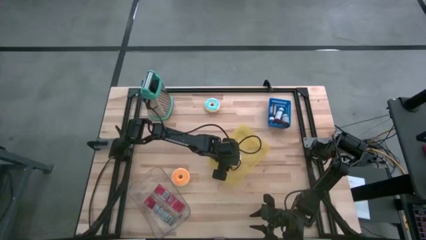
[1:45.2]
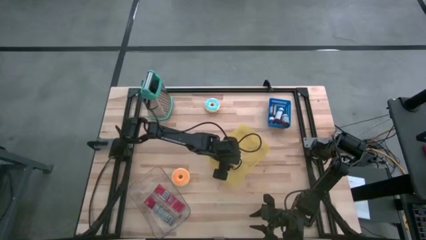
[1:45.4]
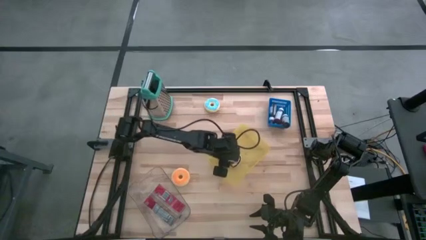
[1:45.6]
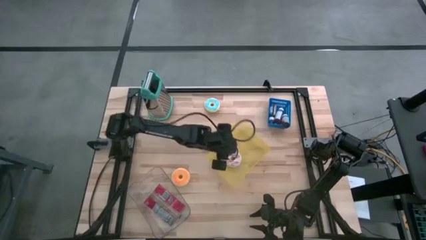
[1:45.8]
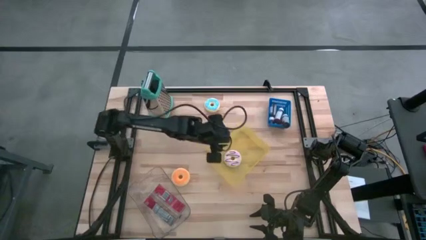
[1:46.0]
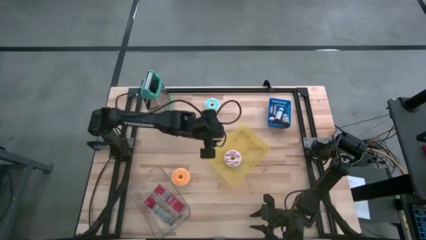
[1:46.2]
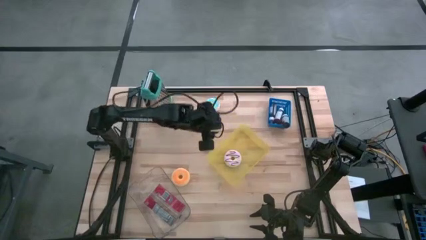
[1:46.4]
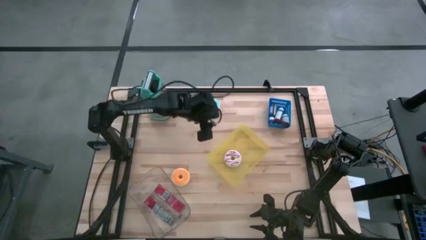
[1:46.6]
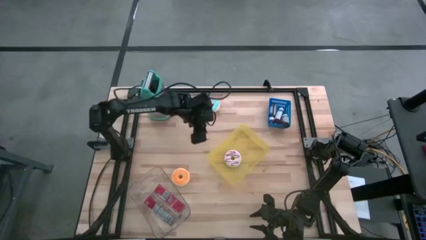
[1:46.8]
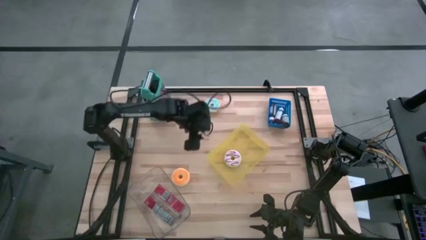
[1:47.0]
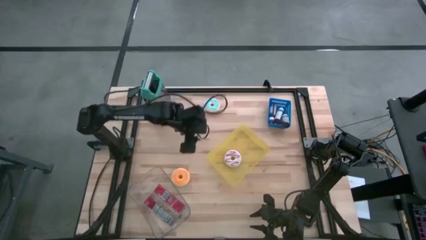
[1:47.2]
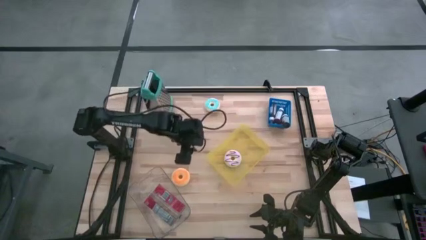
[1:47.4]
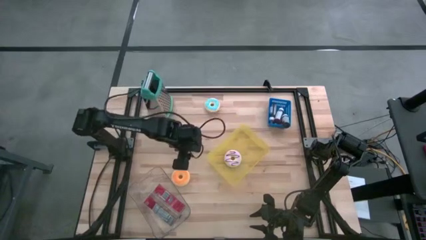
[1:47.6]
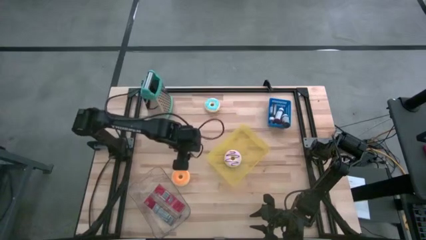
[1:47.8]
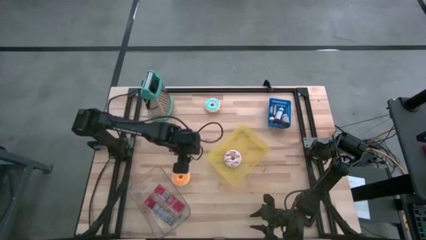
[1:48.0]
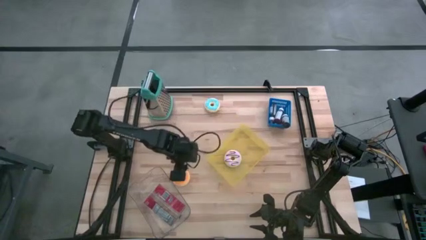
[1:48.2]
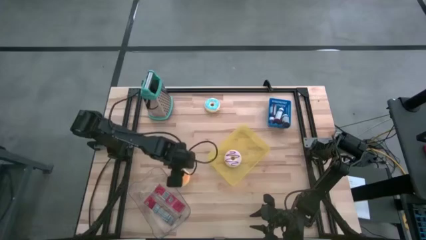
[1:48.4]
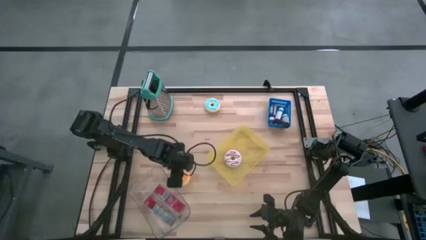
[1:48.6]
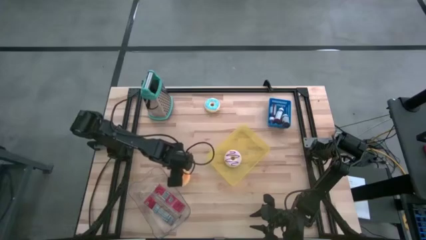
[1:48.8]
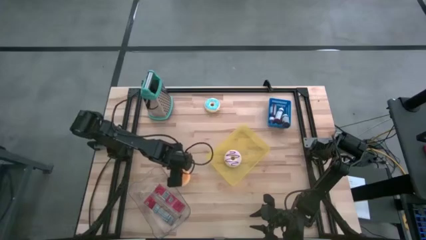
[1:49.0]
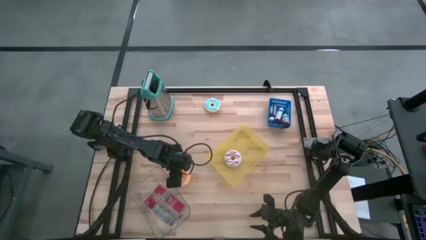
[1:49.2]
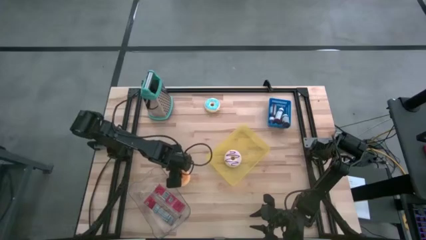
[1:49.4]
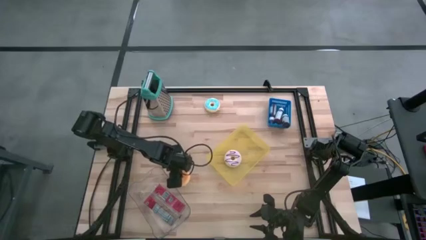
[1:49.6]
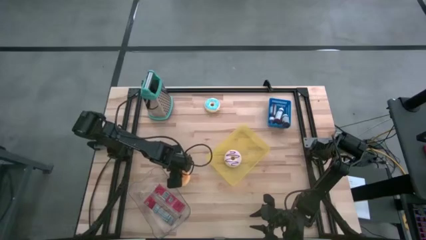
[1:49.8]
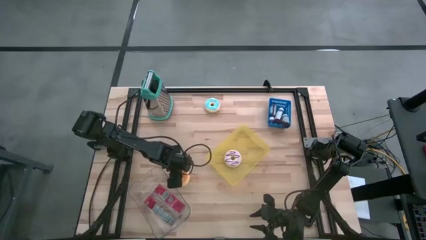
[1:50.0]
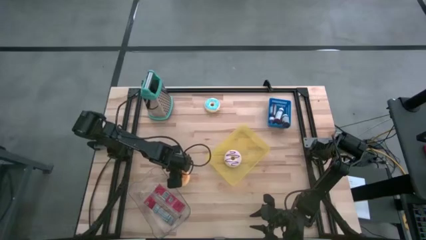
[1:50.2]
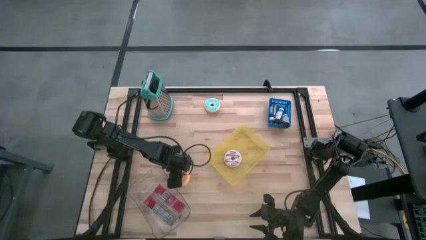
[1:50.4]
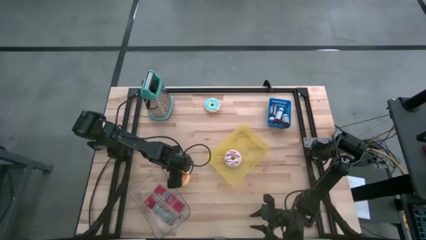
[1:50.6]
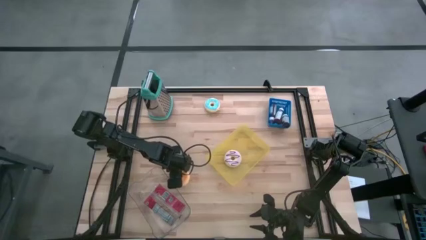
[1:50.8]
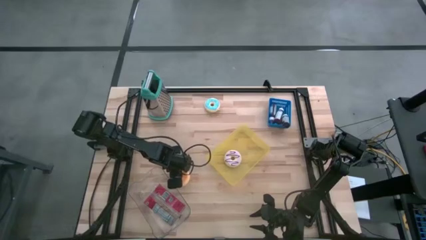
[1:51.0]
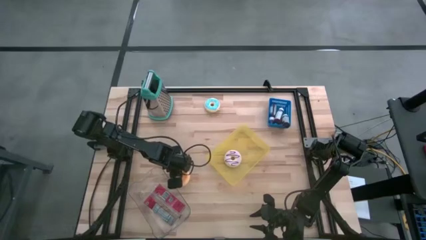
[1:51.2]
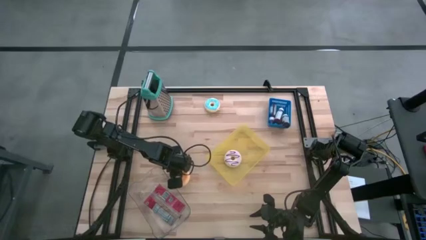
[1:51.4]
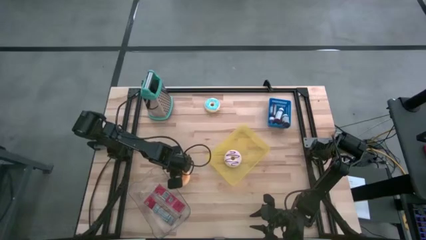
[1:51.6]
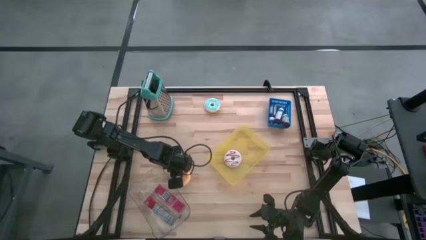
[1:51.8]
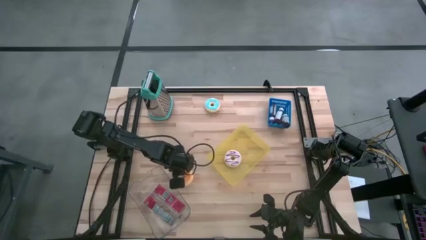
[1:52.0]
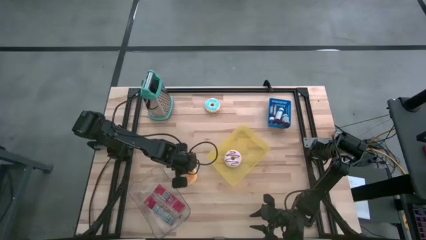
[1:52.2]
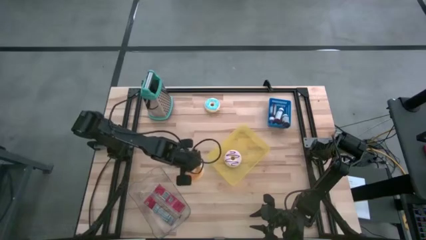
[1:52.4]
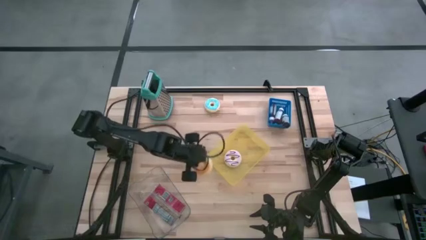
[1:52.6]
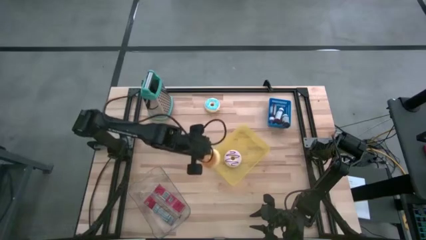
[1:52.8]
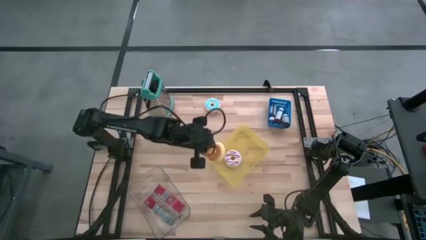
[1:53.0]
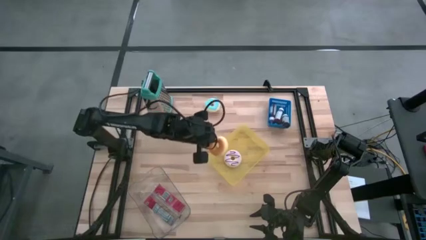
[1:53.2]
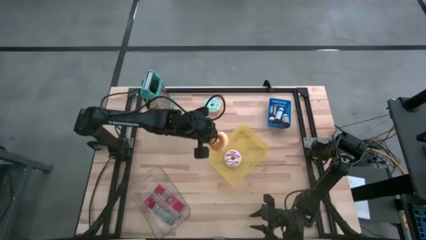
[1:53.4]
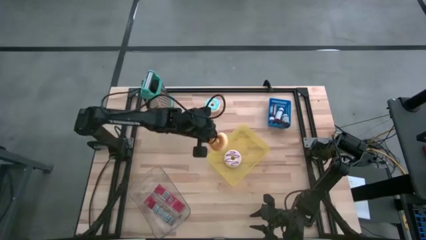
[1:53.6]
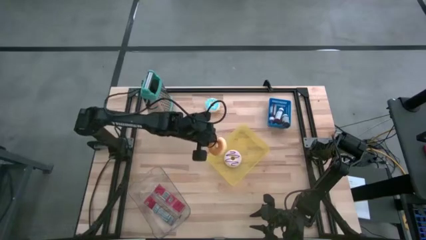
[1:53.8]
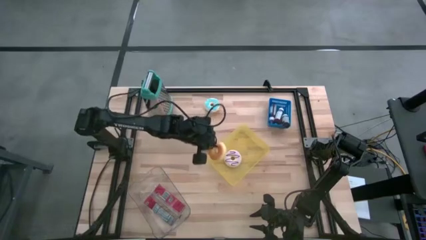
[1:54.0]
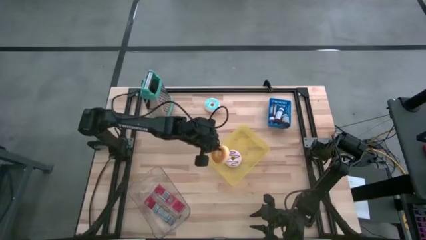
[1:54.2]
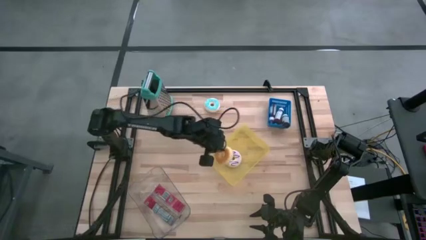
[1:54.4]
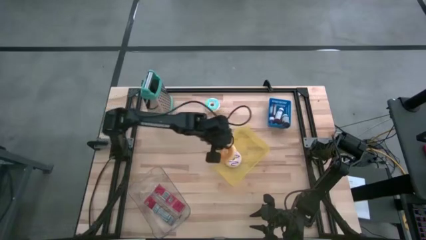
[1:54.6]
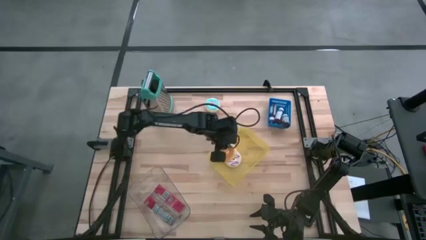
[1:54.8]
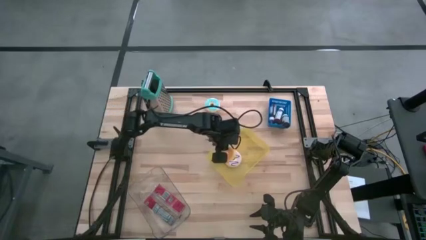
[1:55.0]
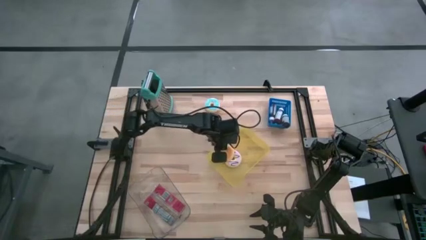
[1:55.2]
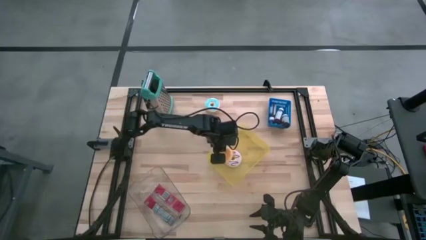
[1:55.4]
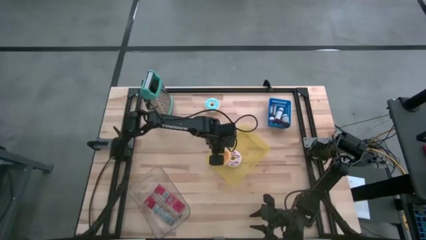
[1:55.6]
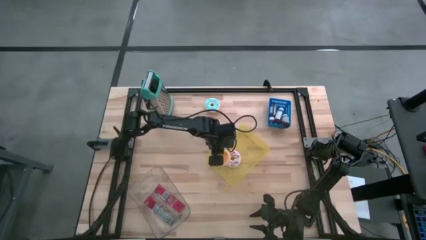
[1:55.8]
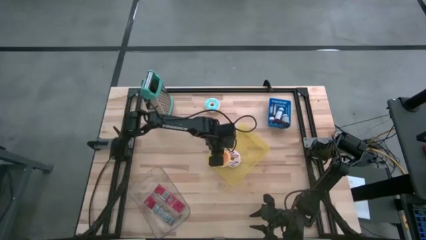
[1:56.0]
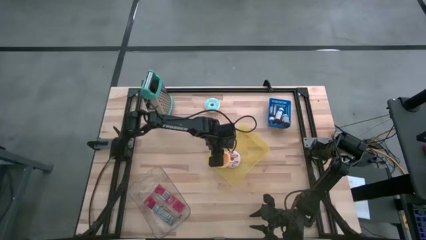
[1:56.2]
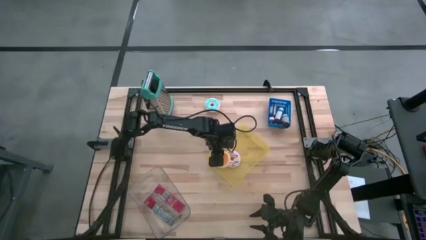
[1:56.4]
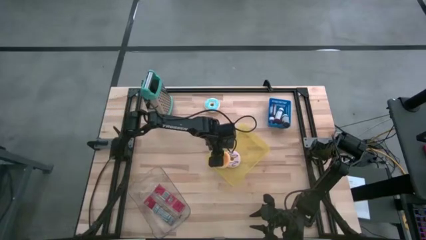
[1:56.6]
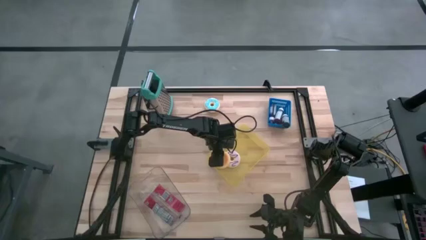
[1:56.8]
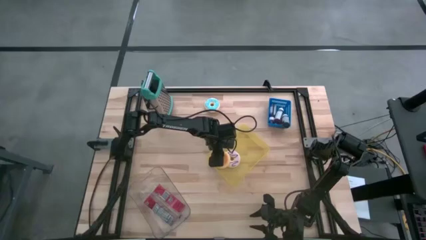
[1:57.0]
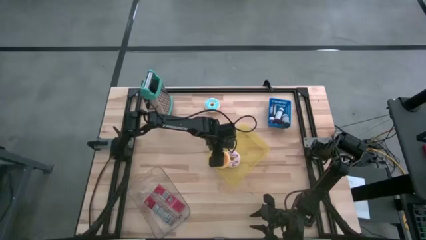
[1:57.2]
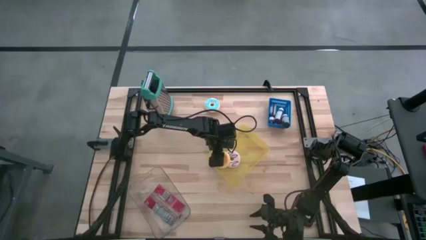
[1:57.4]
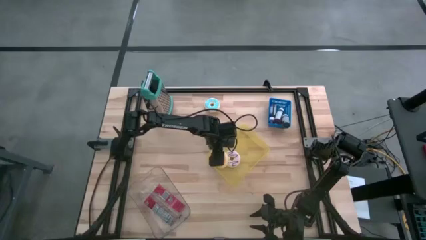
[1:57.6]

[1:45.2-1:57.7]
Task: Pick & Place Food Item
Put the white donut into the yellow bin
